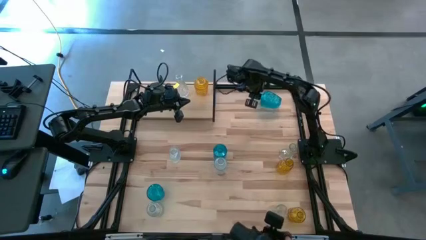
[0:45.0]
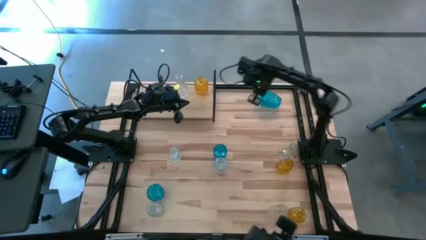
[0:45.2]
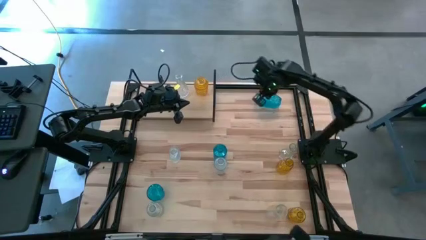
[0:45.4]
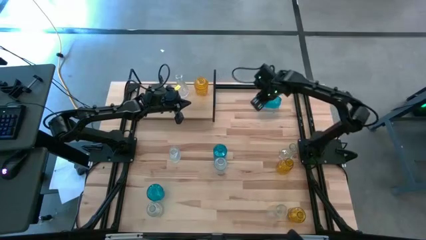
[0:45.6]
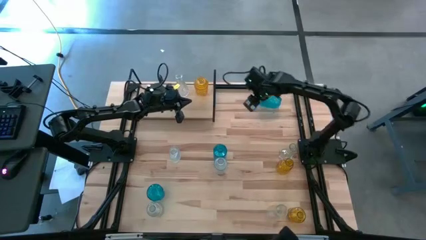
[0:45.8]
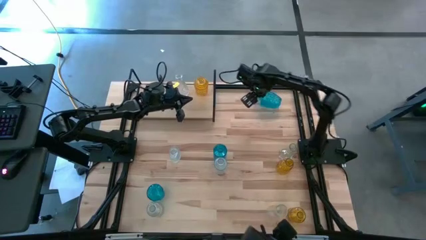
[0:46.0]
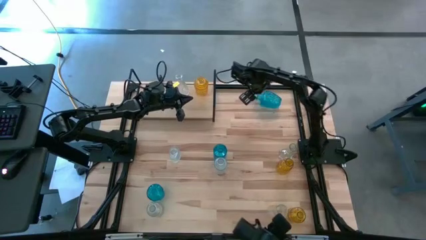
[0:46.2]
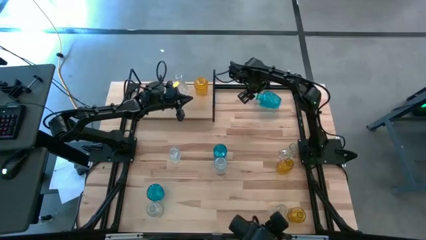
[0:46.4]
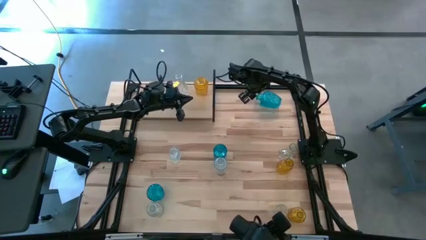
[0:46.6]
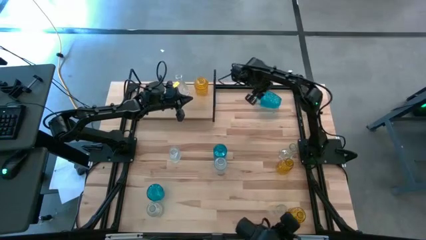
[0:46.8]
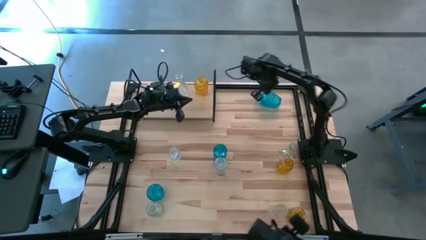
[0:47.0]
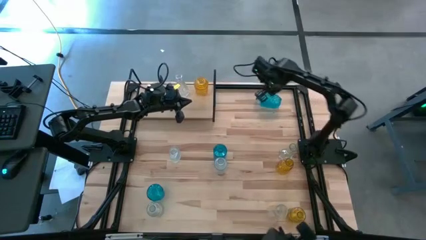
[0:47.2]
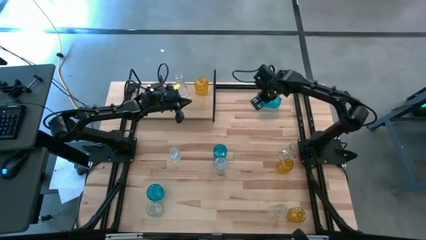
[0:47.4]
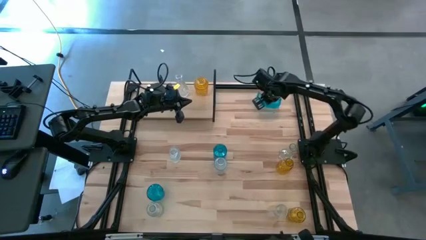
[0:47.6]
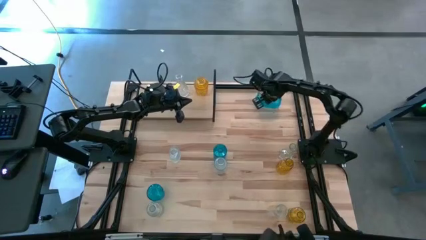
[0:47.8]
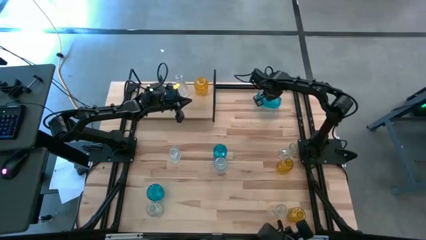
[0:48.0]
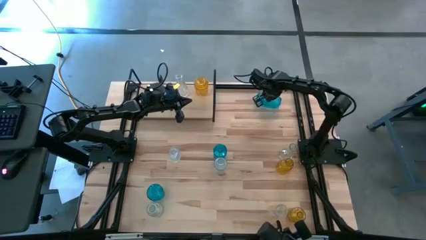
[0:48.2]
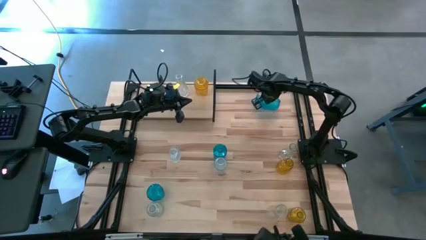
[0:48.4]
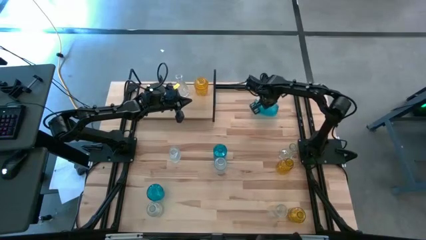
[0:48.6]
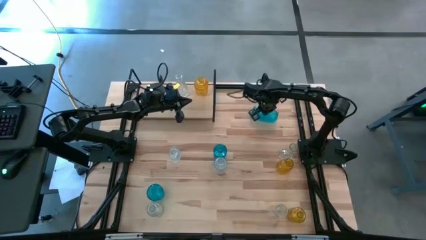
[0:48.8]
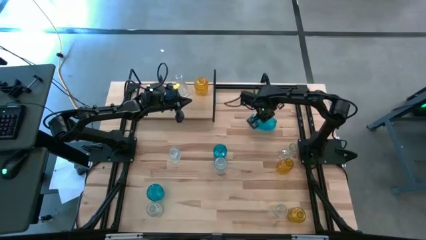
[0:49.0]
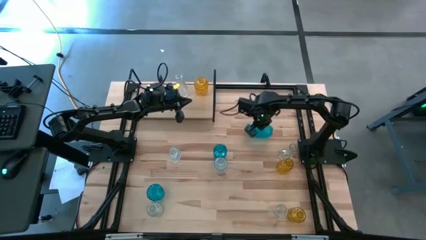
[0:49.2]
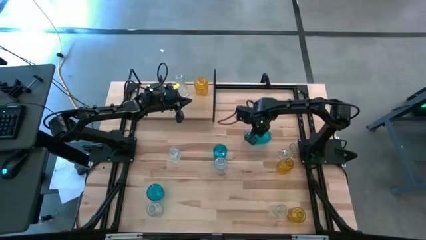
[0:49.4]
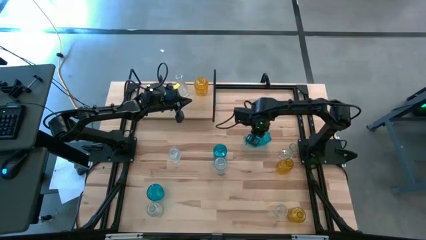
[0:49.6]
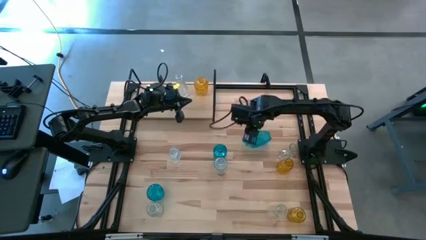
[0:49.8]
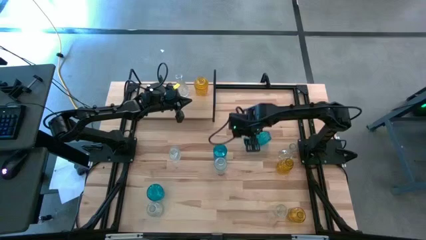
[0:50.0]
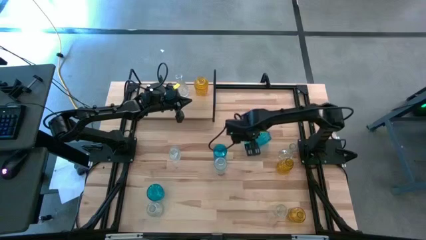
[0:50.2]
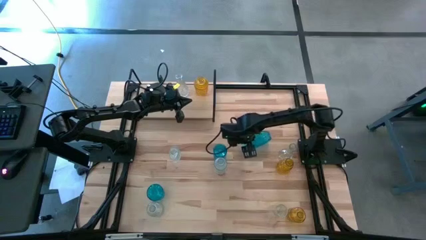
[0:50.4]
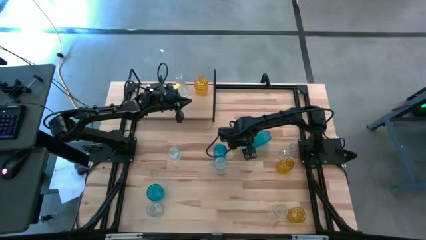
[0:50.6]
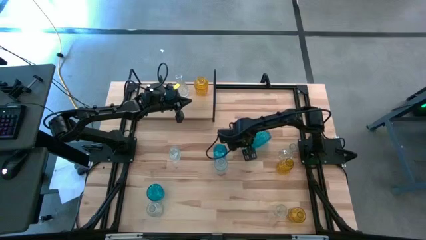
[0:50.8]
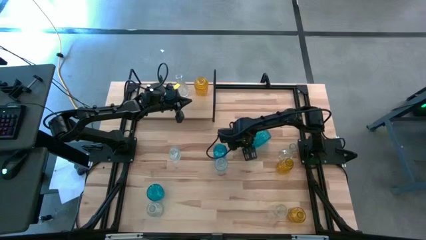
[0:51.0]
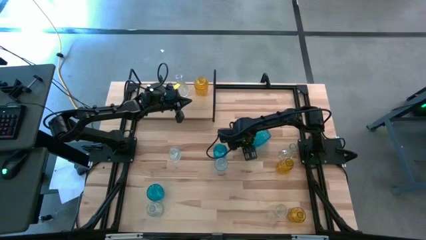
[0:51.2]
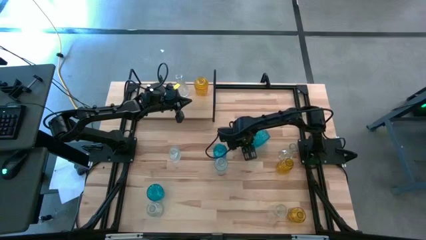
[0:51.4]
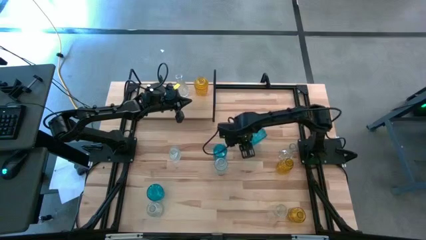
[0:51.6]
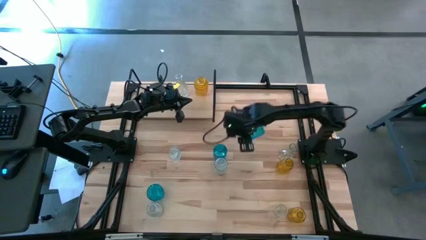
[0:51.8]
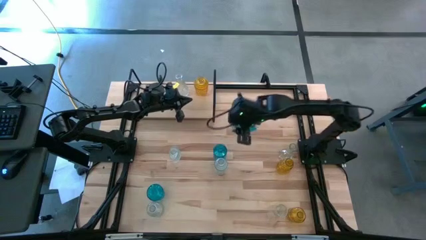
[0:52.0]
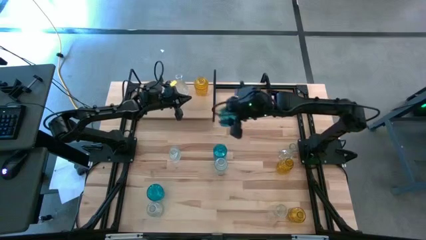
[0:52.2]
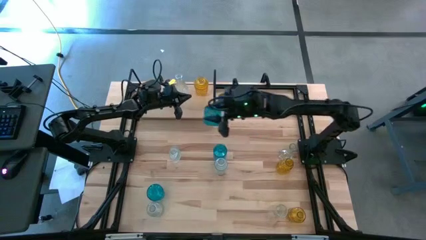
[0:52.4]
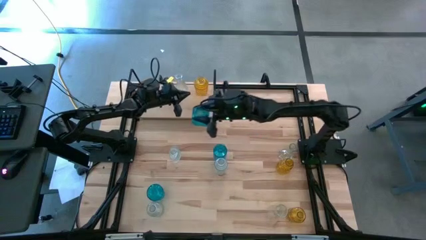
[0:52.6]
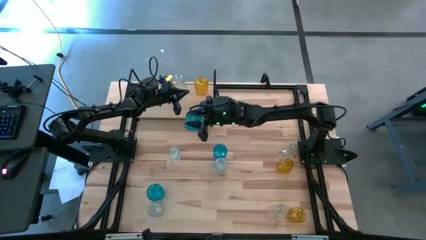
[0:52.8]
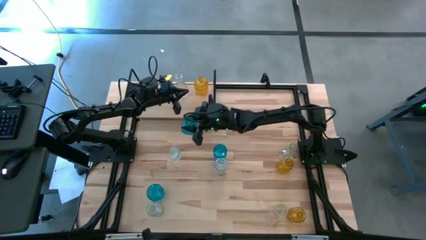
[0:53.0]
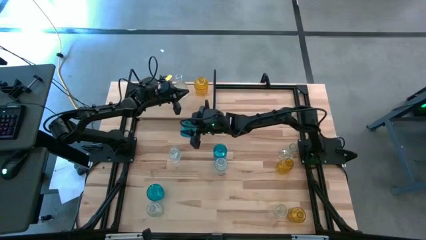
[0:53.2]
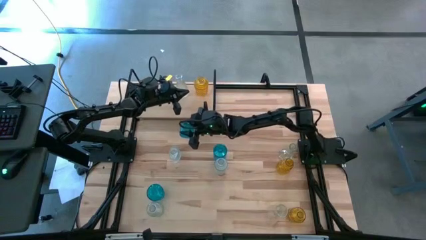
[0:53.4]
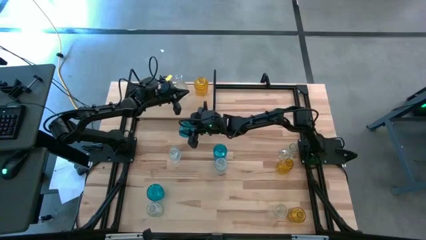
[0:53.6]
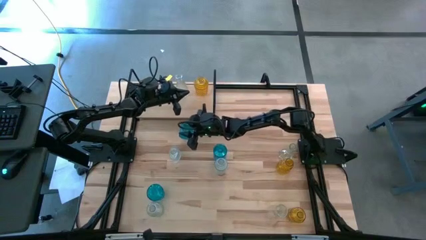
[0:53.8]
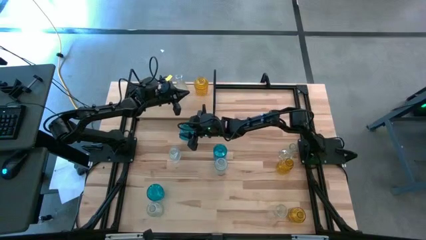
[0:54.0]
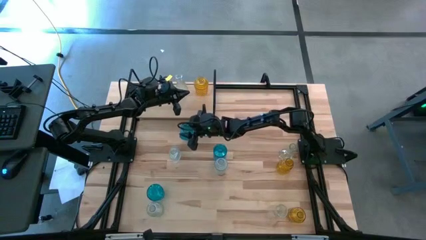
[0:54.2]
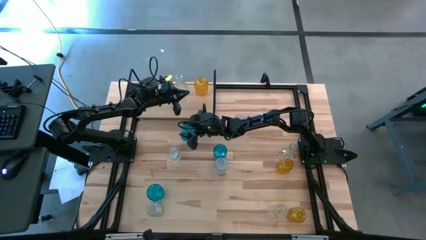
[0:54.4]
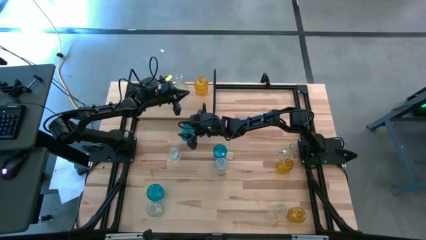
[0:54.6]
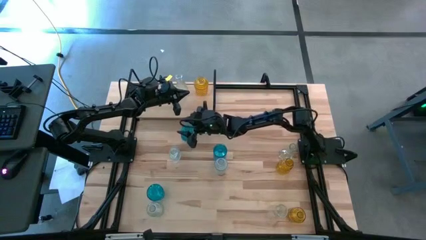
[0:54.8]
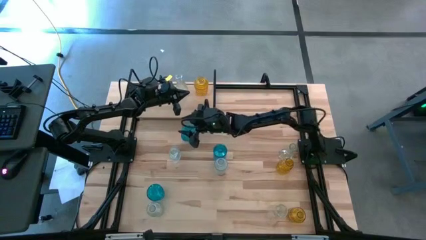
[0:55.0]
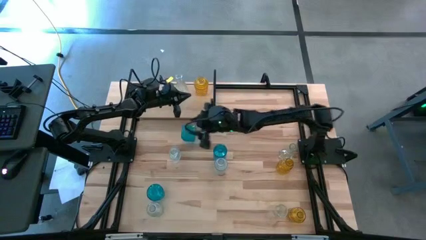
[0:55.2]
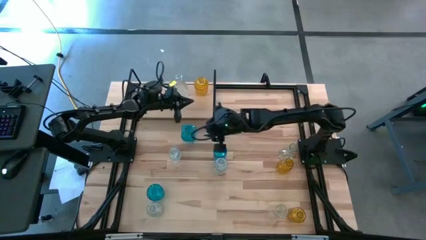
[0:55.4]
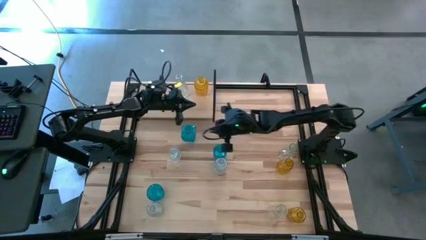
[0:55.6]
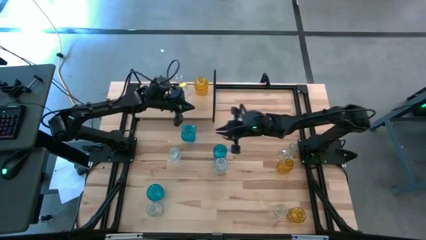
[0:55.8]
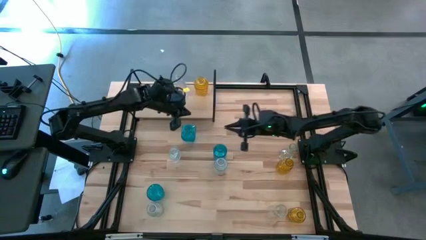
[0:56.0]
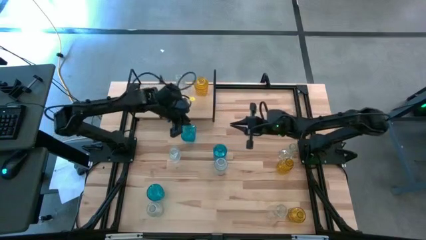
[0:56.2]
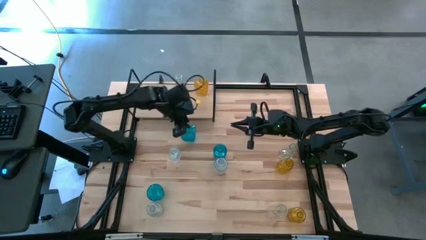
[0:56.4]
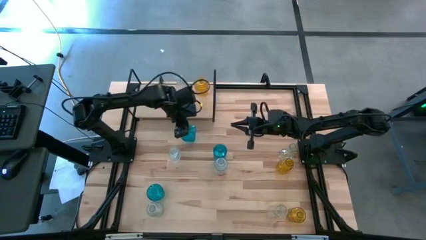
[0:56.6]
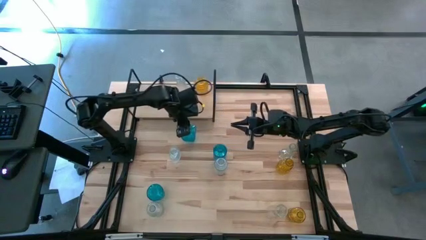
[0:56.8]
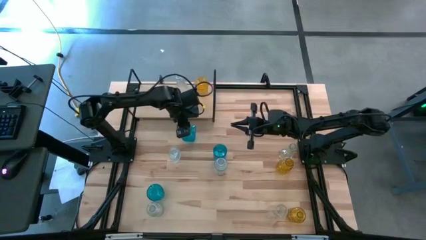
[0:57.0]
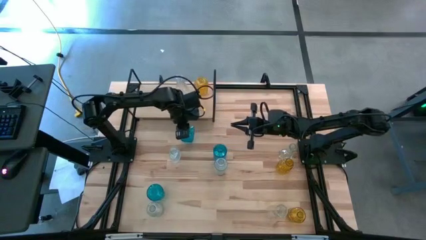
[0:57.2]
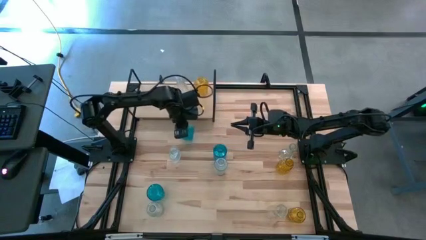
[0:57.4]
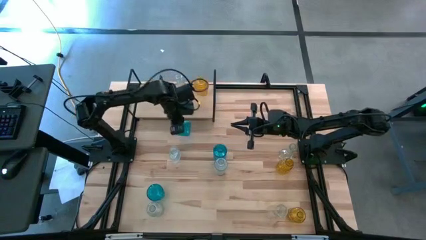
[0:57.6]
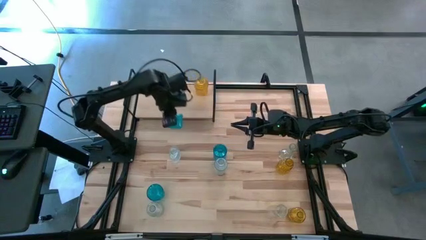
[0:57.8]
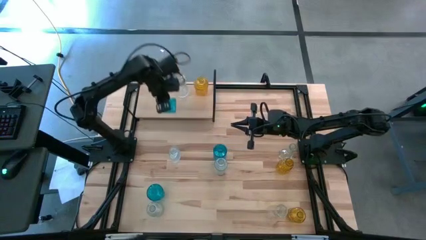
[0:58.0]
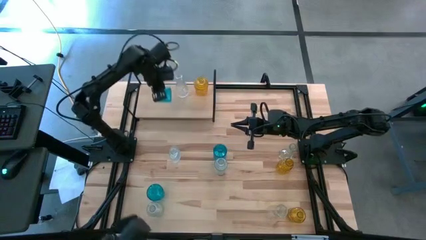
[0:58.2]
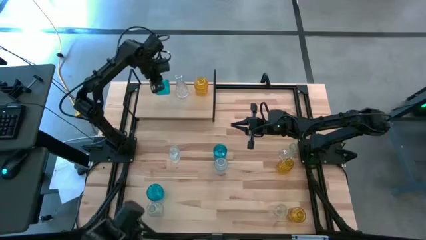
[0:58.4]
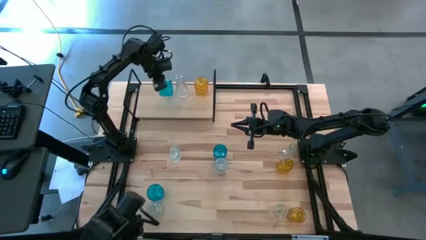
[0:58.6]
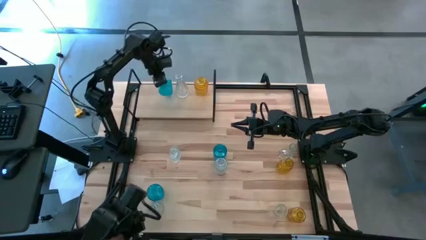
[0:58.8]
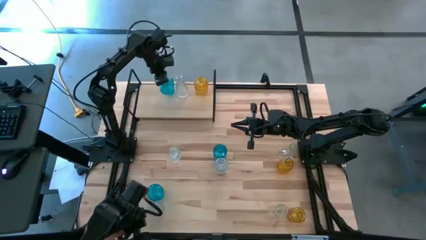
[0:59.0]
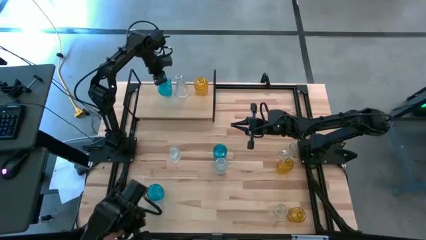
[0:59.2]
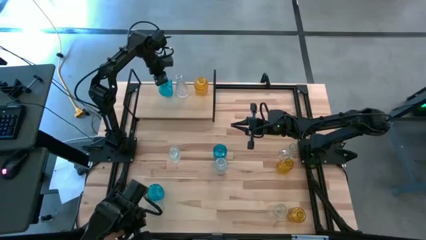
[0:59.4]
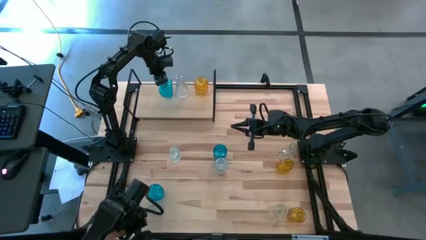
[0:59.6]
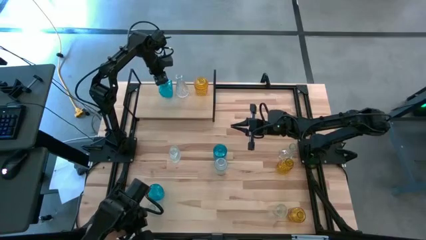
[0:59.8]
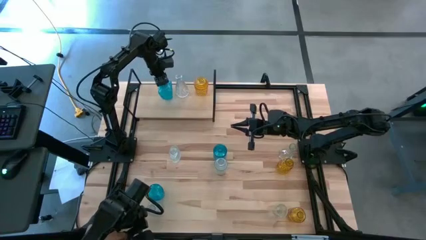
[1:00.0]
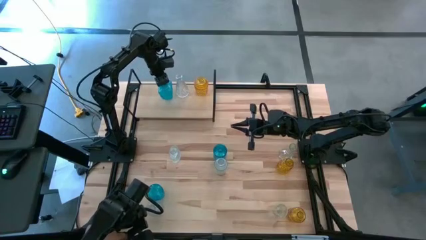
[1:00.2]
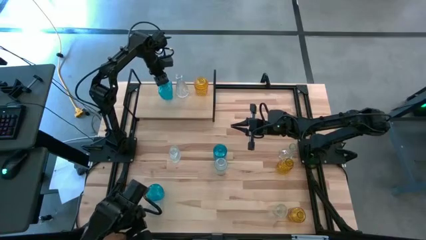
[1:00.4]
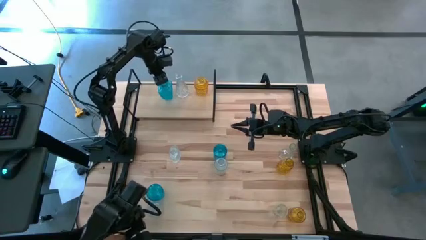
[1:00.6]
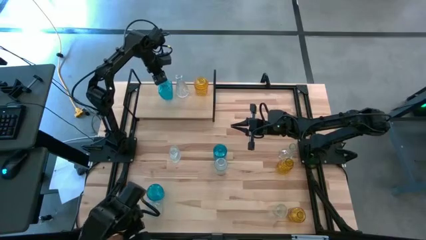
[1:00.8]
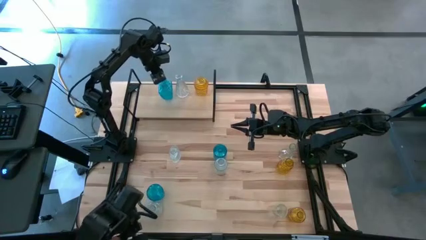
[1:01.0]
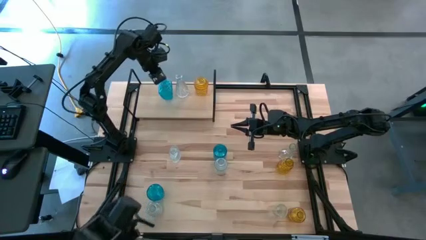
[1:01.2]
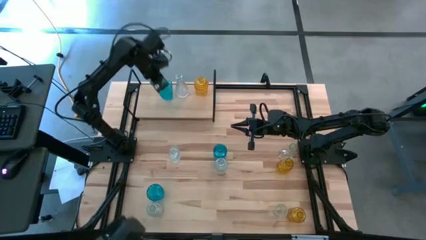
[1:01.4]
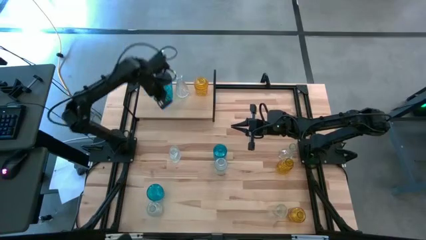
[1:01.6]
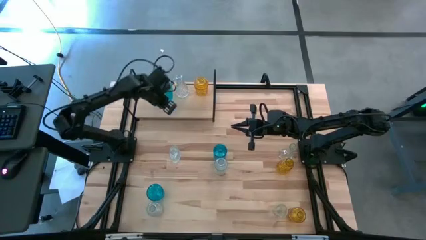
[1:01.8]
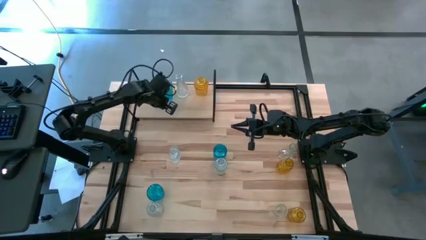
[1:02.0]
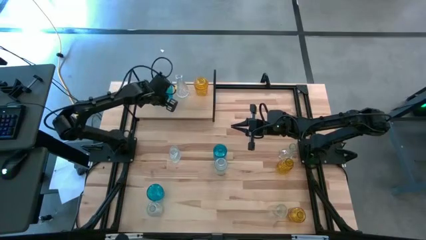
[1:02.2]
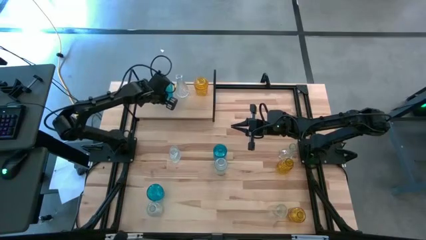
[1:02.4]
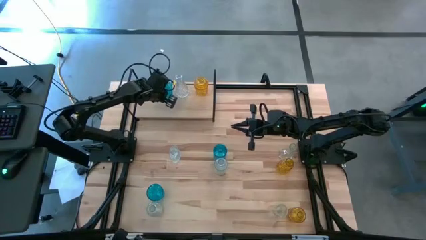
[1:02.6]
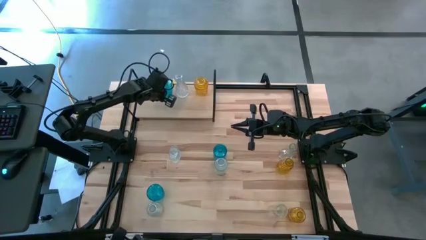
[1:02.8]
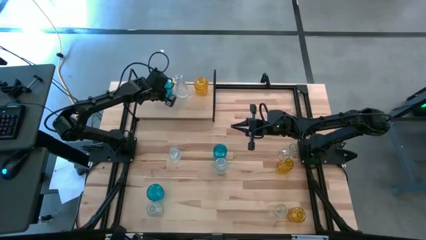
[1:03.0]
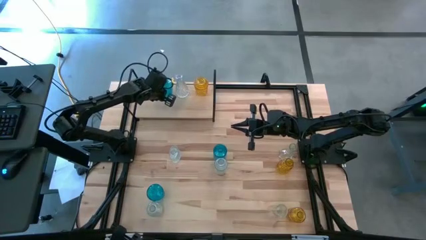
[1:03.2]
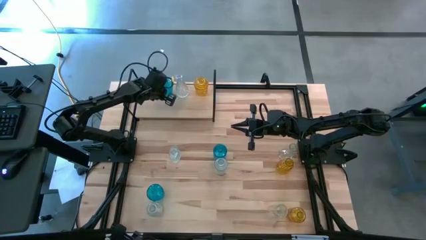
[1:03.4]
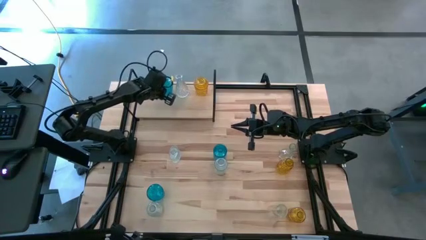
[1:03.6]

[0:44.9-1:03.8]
Task: sort vases onto shelf
Put the blue vase on the shelf
